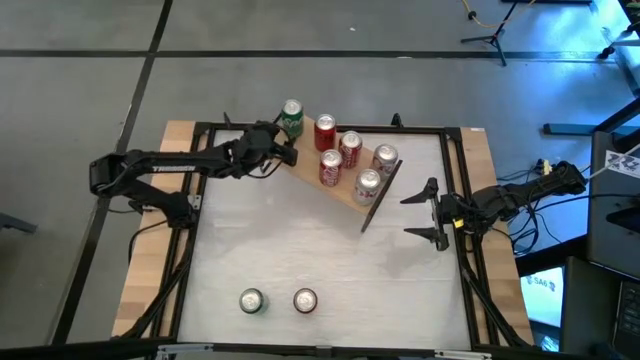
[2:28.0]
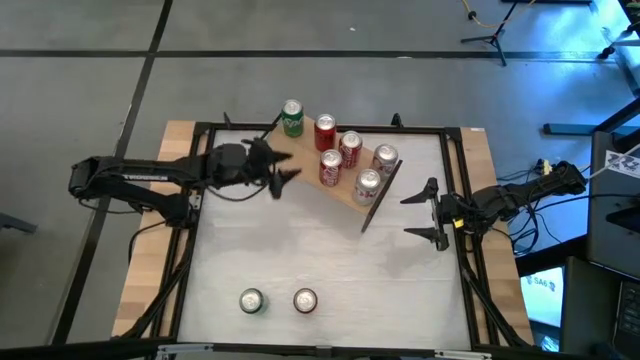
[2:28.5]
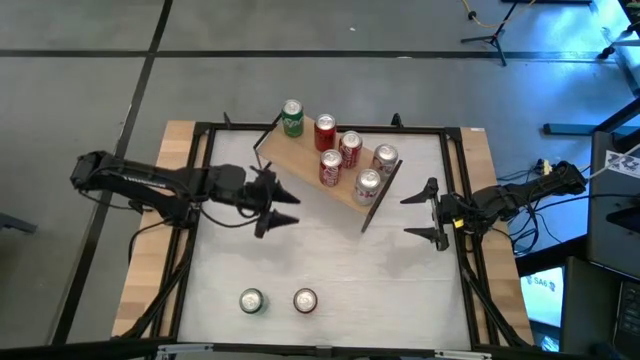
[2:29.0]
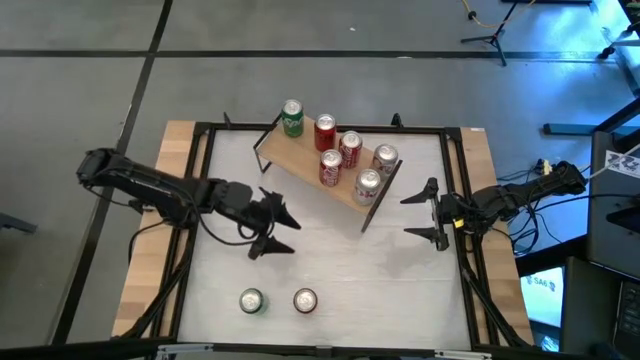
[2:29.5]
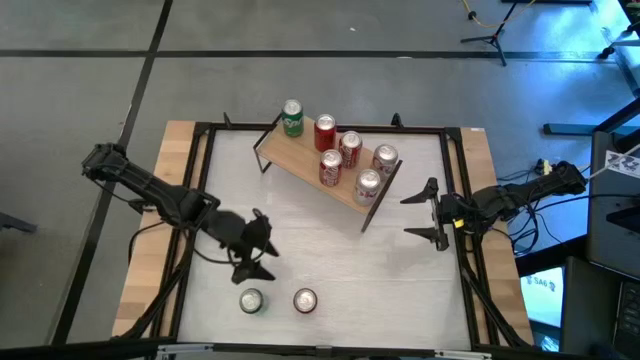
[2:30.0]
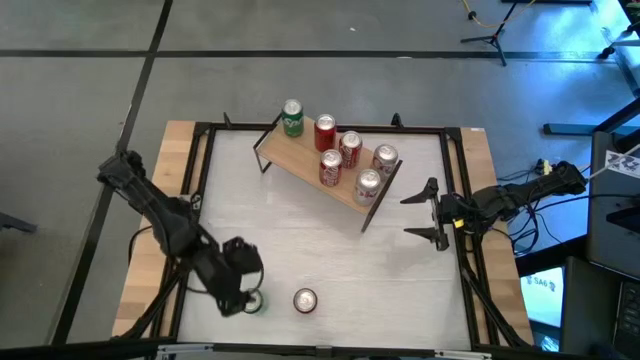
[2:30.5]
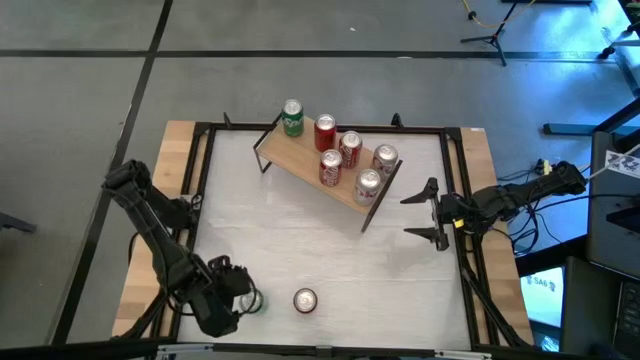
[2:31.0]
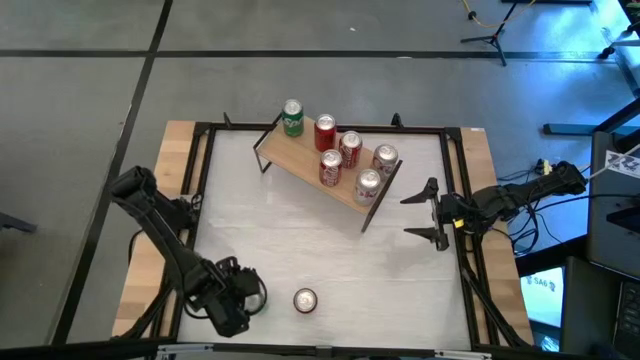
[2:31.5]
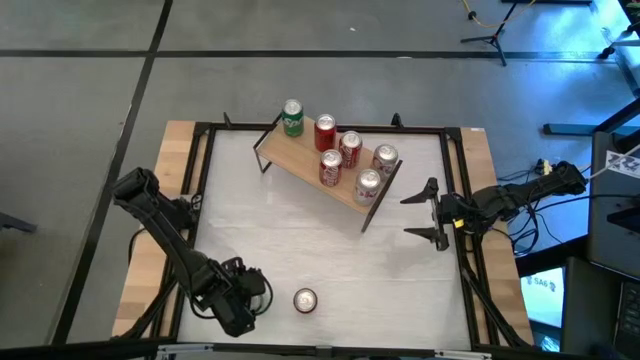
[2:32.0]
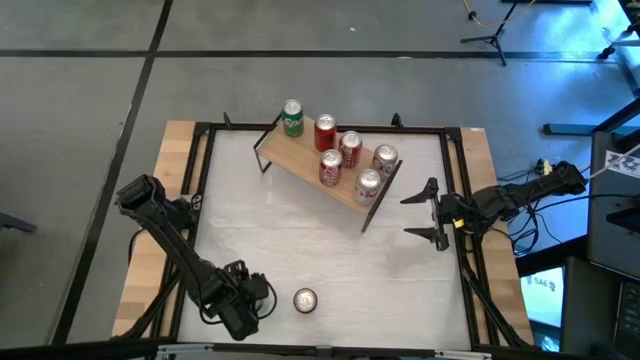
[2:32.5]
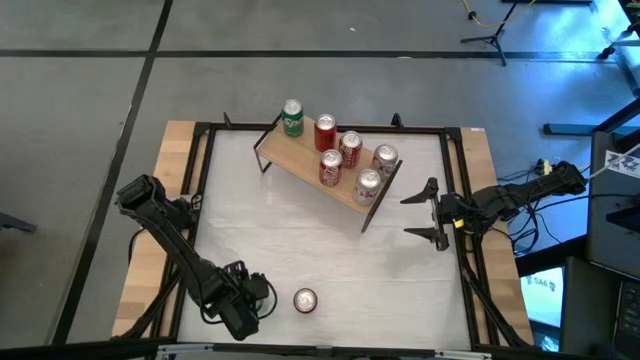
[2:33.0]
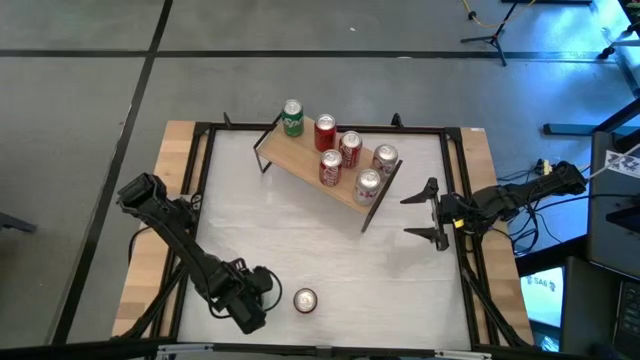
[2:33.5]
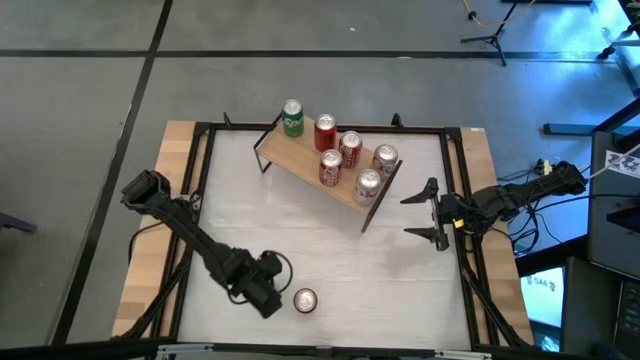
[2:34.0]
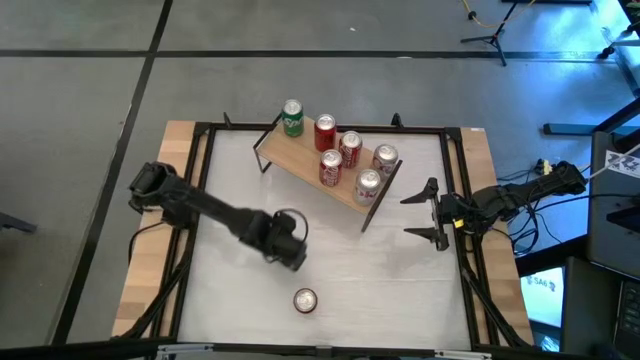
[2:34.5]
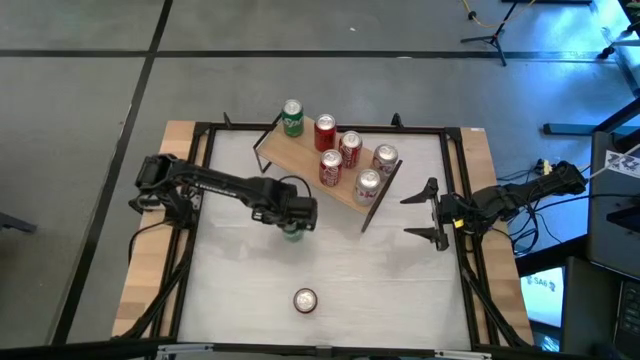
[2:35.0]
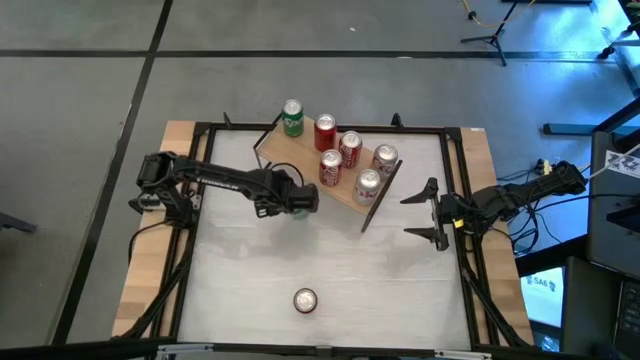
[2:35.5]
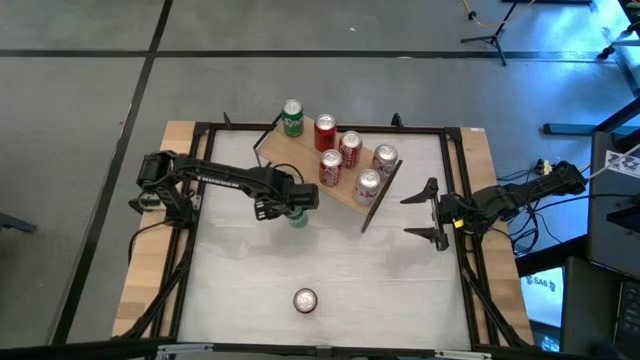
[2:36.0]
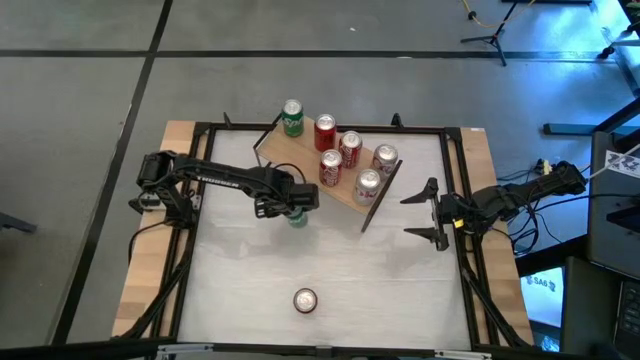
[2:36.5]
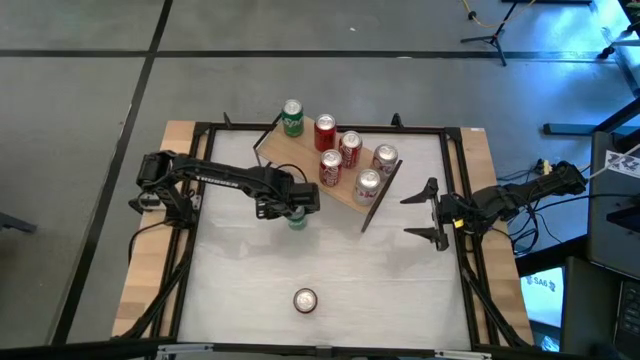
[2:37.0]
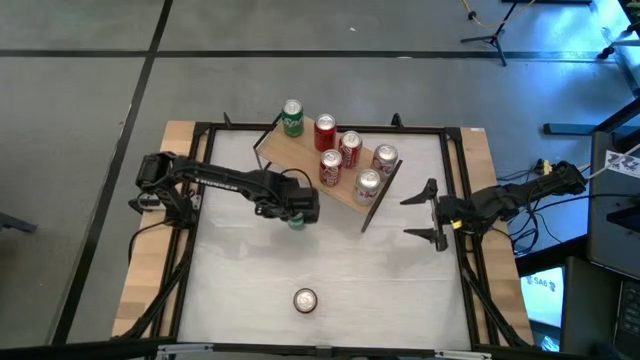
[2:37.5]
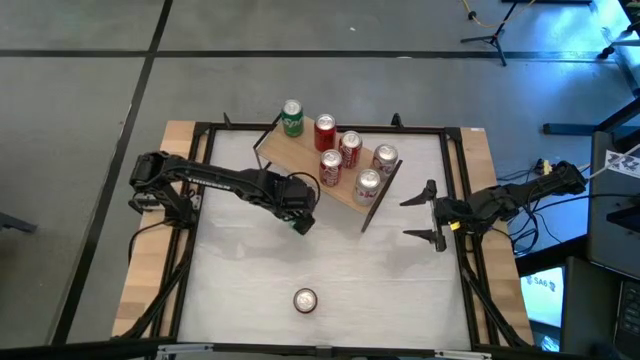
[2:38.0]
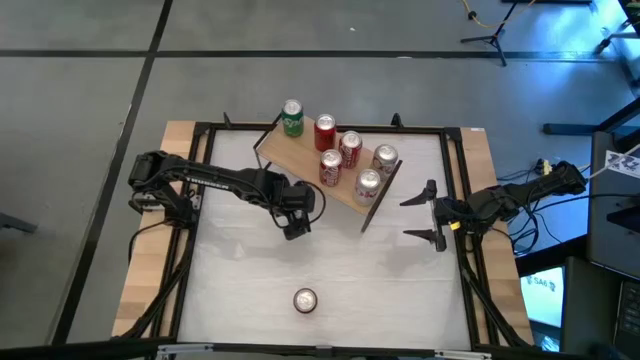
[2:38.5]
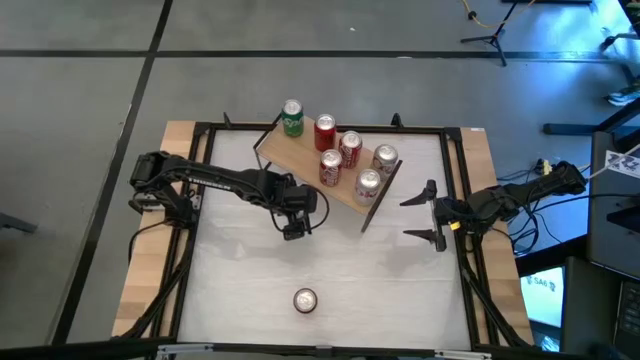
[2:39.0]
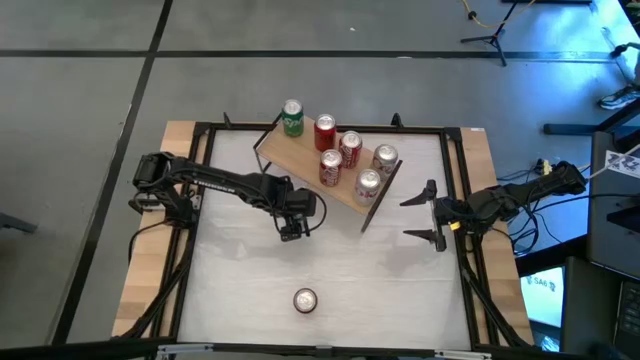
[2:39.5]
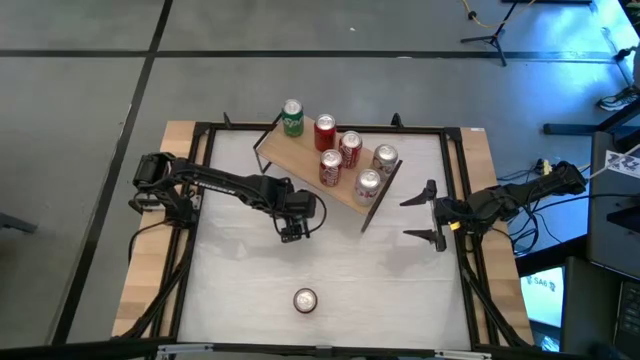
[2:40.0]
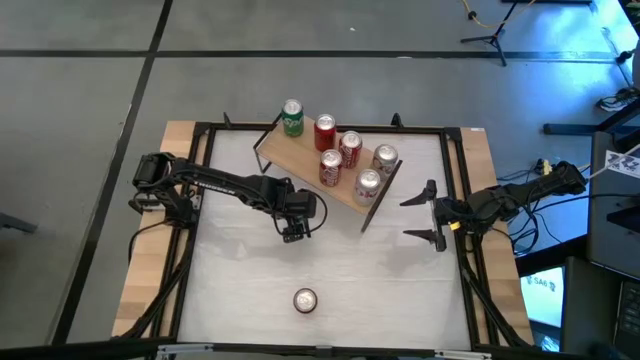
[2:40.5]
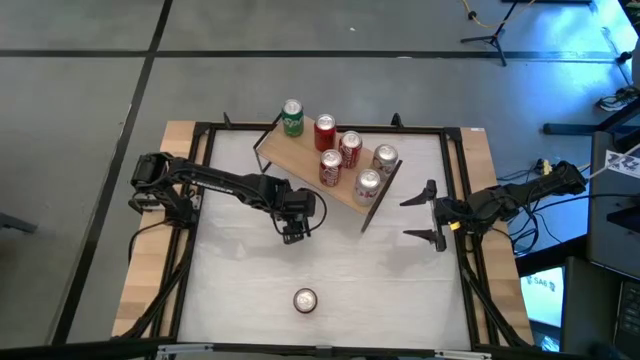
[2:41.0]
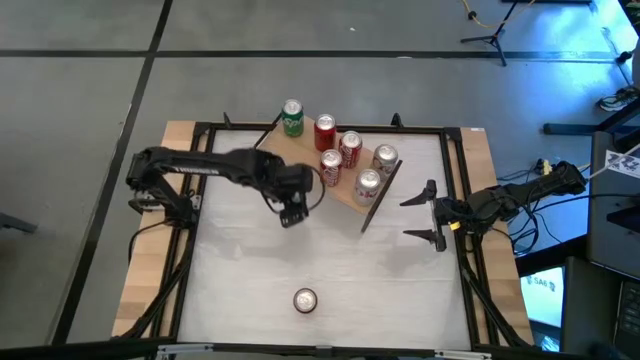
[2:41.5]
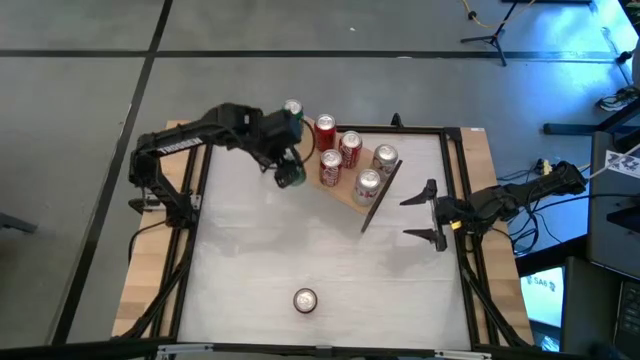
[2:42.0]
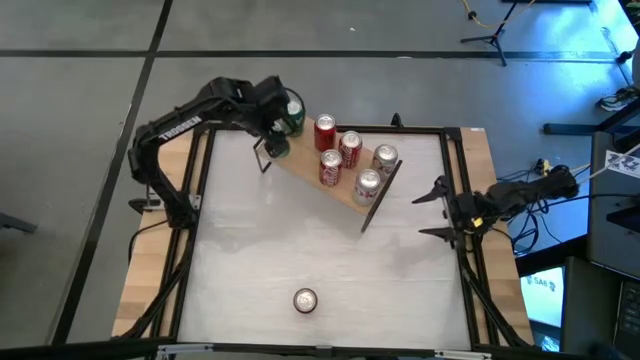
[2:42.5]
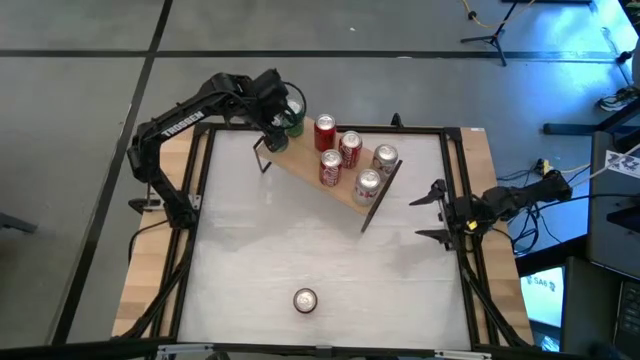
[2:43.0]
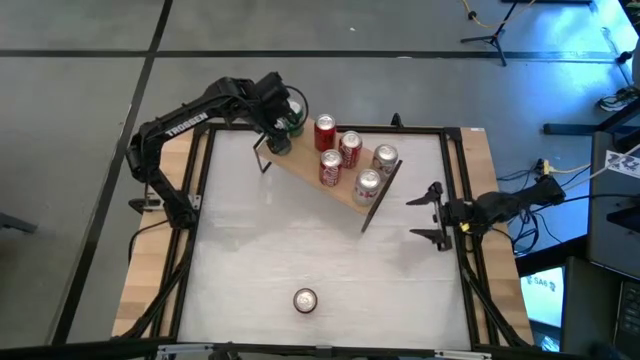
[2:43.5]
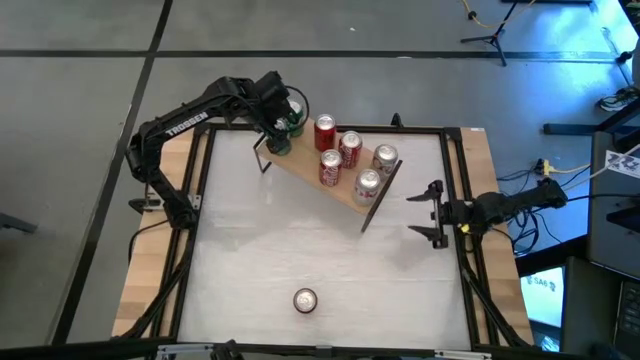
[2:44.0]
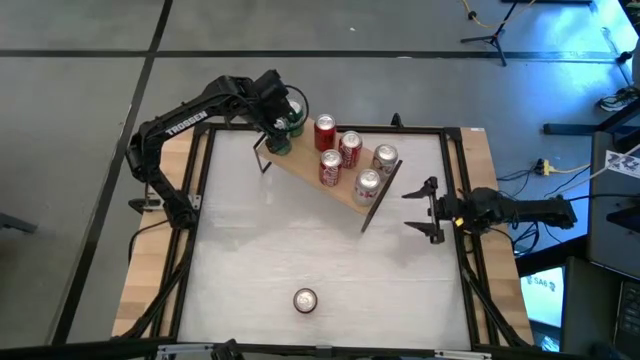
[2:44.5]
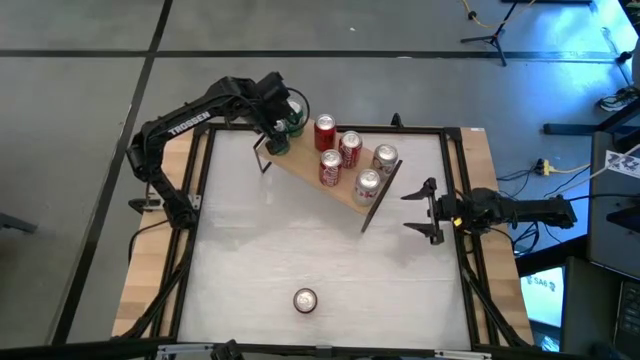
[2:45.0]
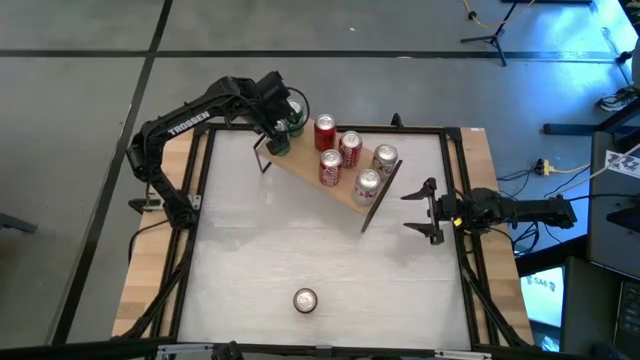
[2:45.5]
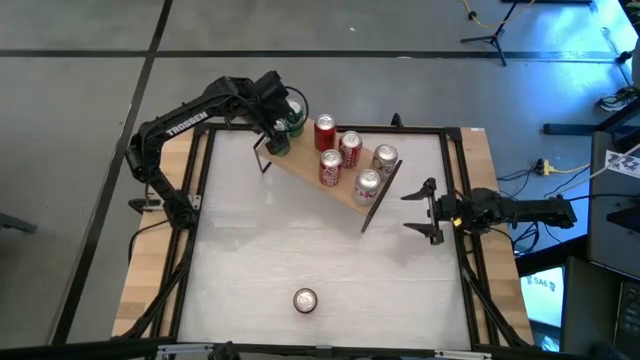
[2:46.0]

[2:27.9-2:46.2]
Task: Place canned beverage on shelf
Put the green soda can on the shelf aligned with the other green soda can
